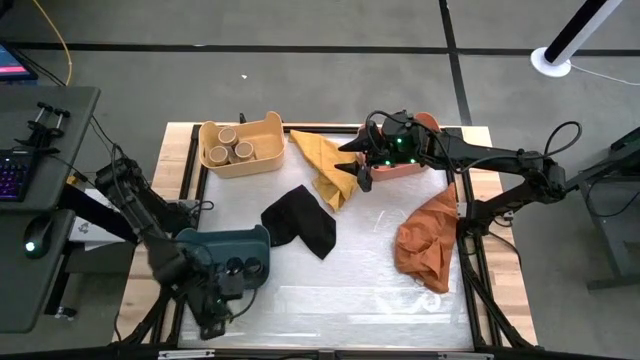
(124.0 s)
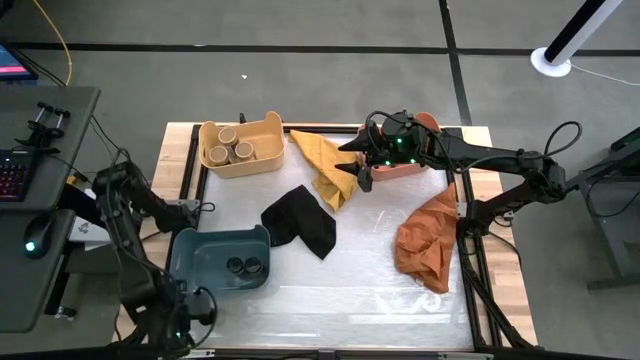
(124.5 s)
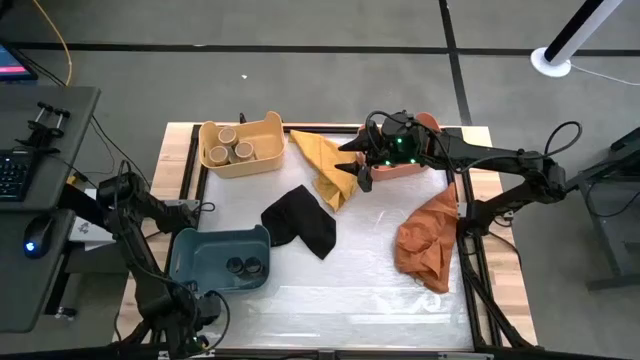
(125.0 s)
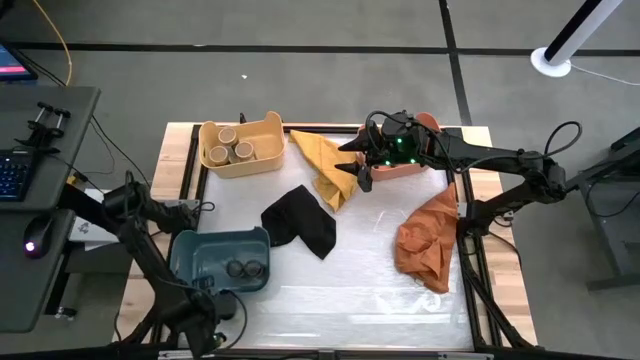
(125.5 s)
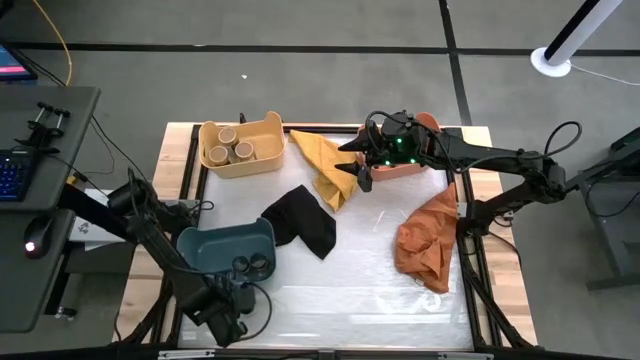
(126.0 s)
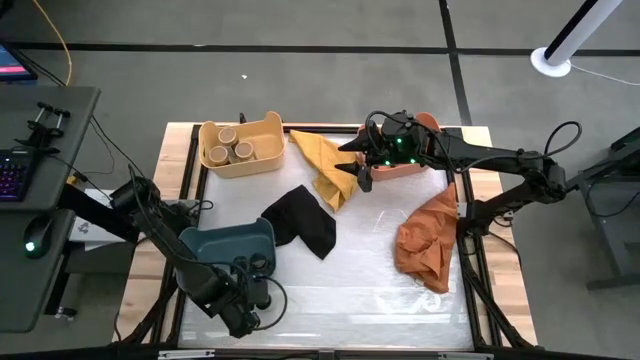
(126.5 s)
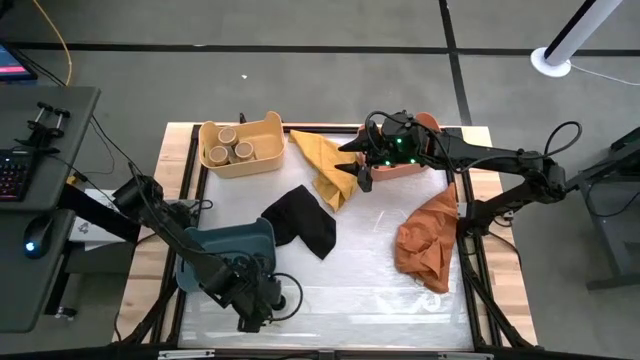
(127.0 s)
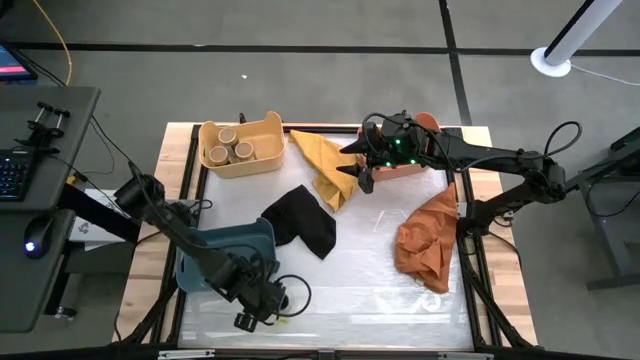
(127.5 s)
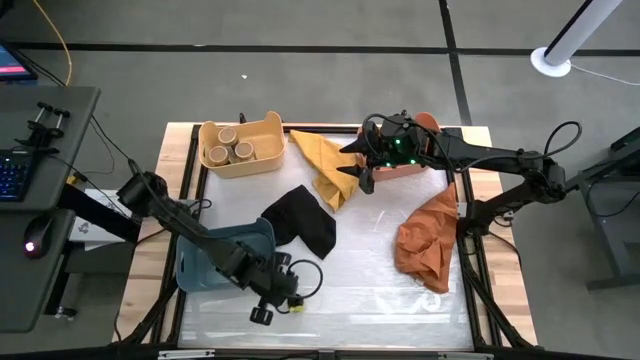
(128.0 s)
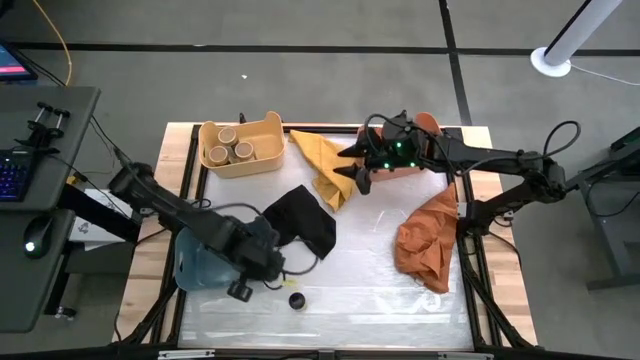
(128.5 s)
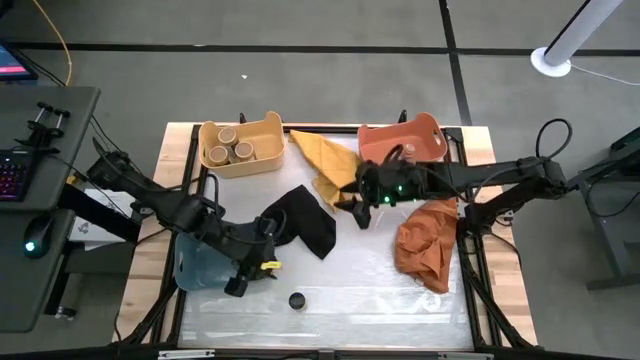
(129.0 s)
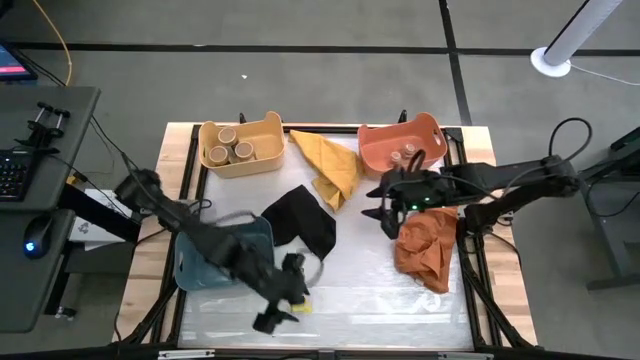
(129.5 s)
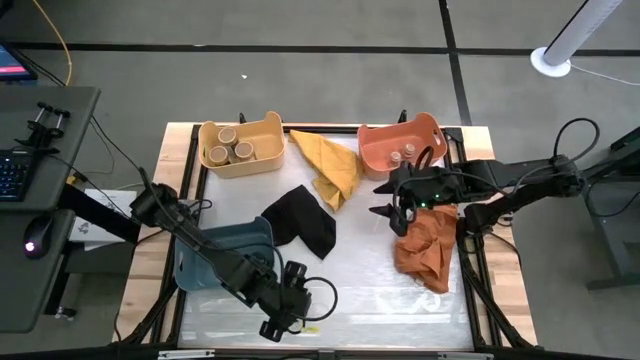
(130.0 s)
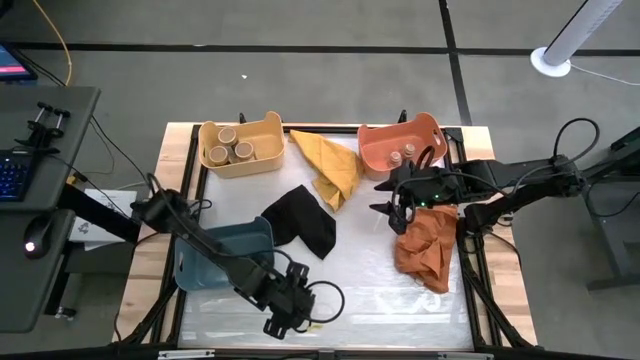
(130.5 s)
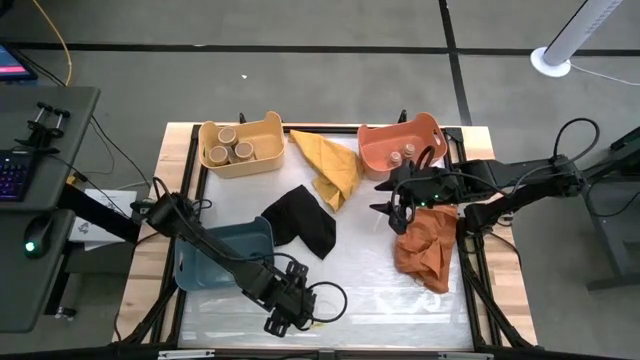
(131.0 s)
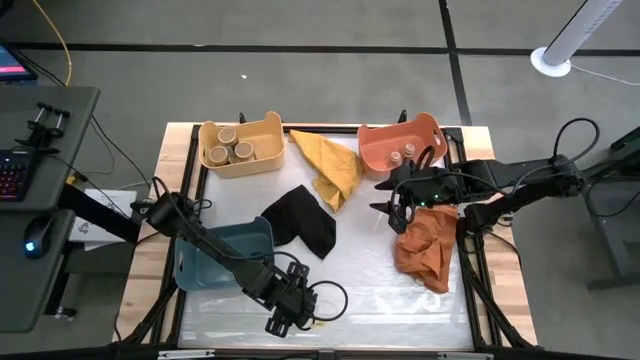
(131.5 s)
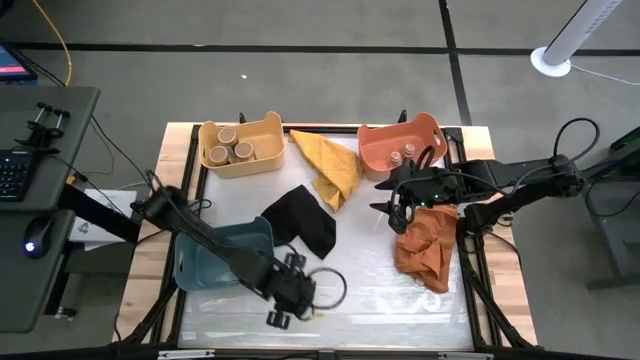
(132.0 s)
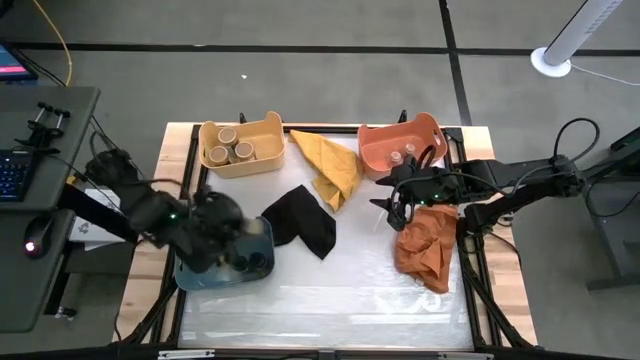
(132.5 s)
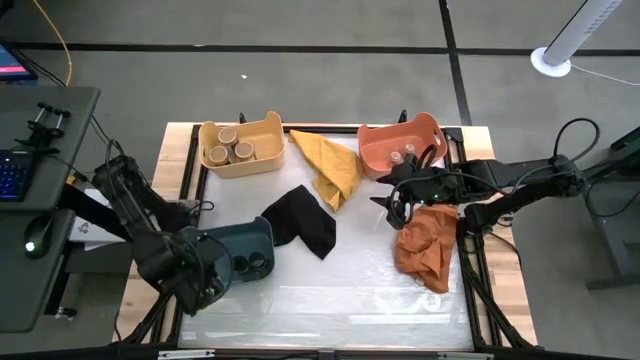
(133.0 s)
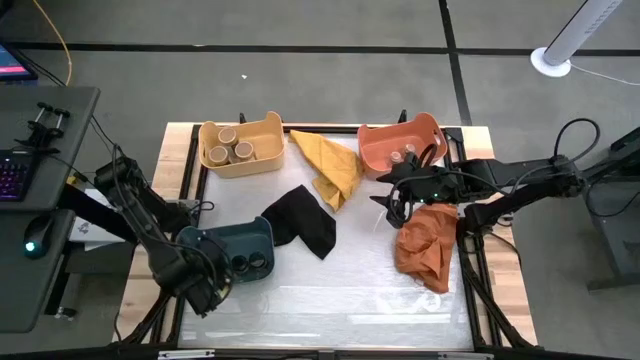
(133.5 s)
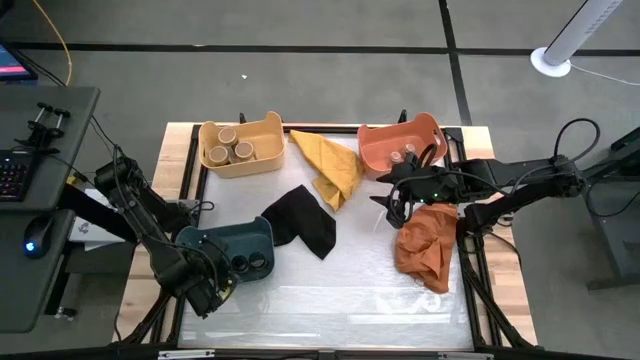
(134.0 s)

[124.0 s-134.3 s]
Task: Sort spices by type
Put the black spice bottle into the blue bin

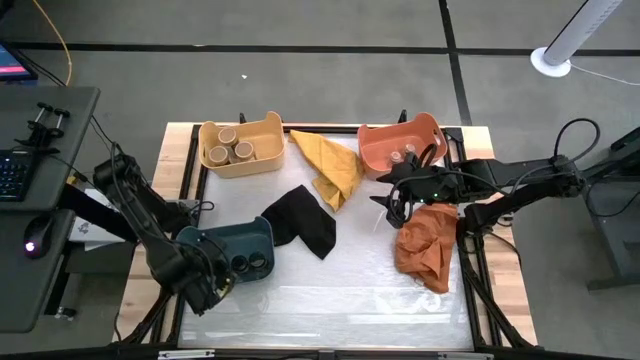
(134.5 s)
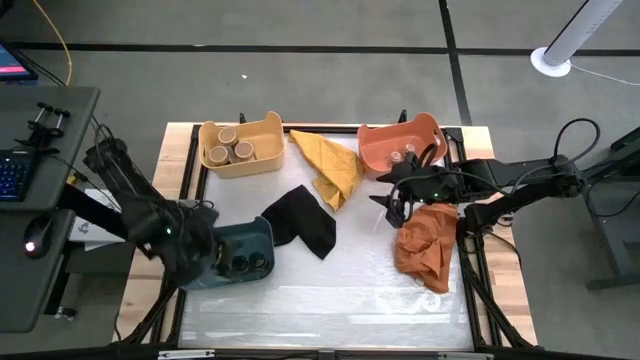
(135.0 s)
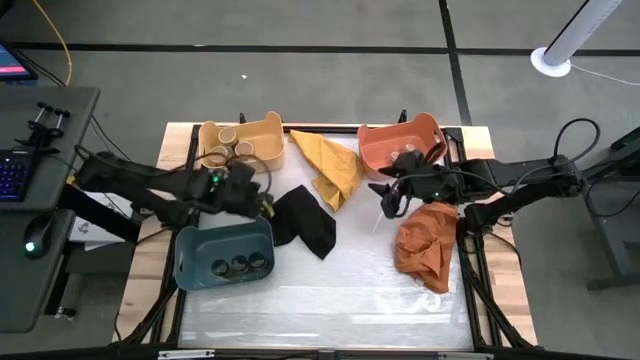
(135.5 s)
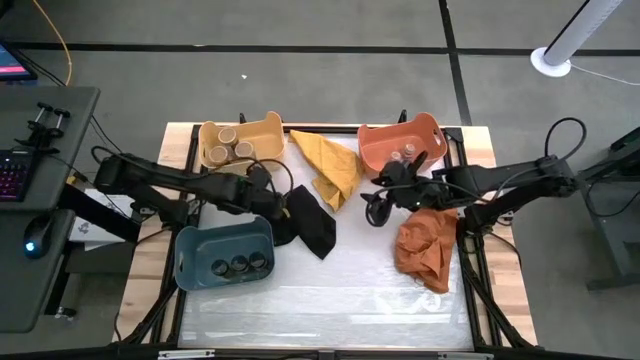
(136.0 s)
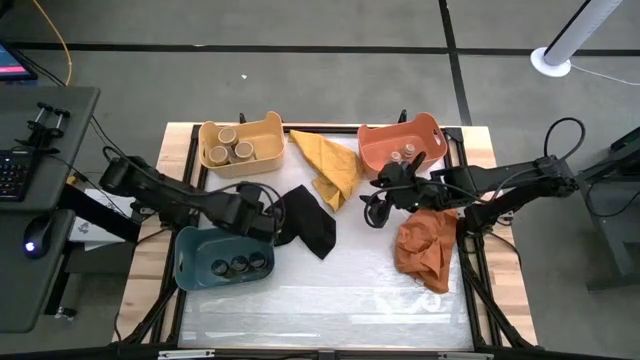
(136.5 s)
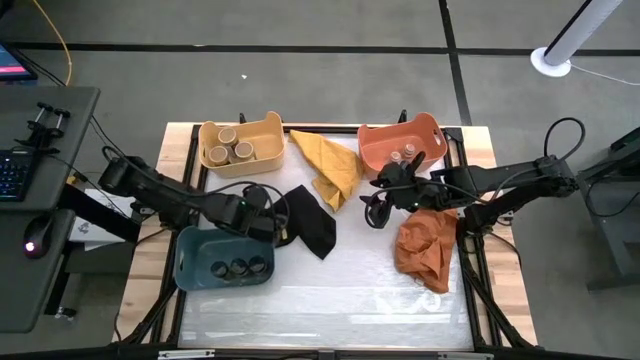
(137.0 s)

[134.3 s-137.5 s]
Adjust the blue bin

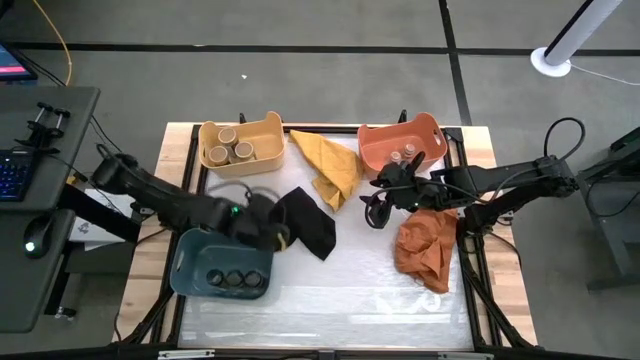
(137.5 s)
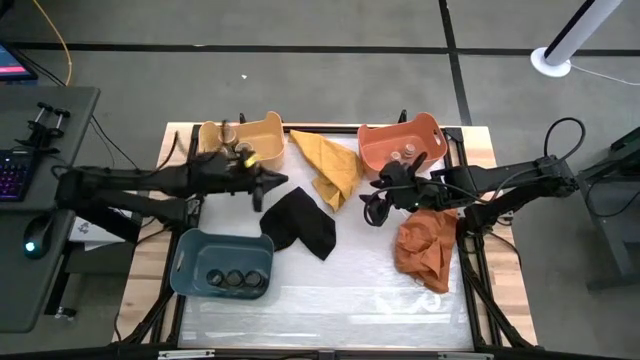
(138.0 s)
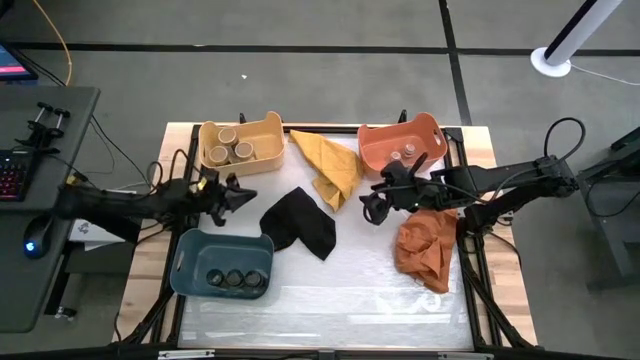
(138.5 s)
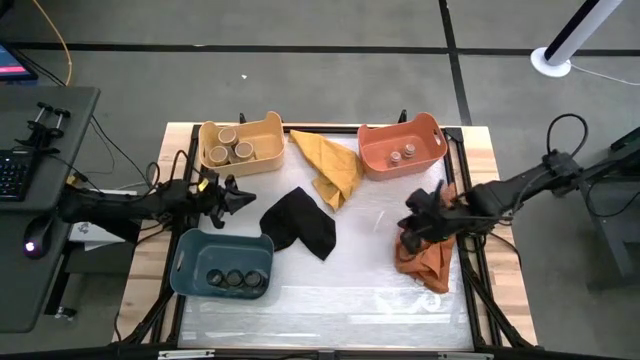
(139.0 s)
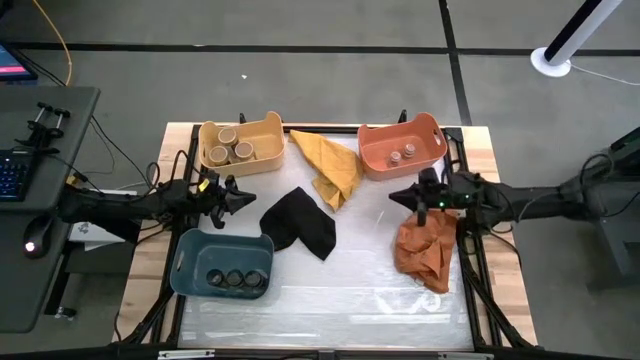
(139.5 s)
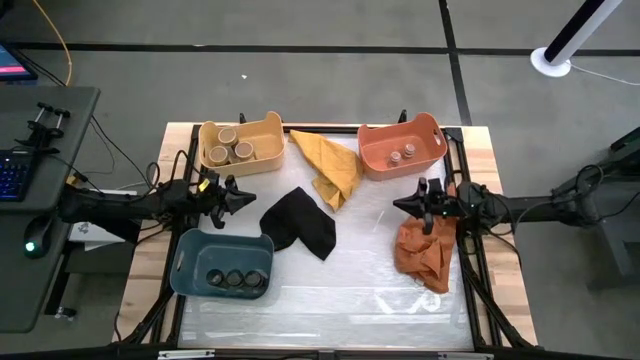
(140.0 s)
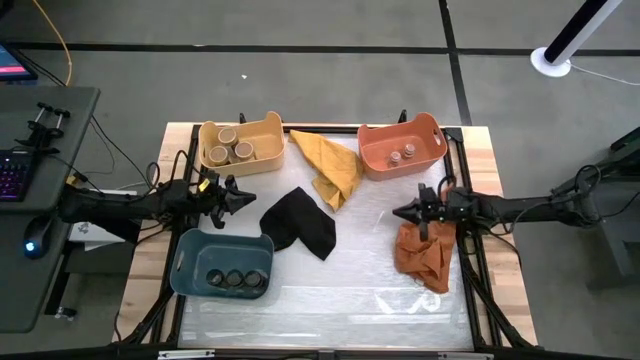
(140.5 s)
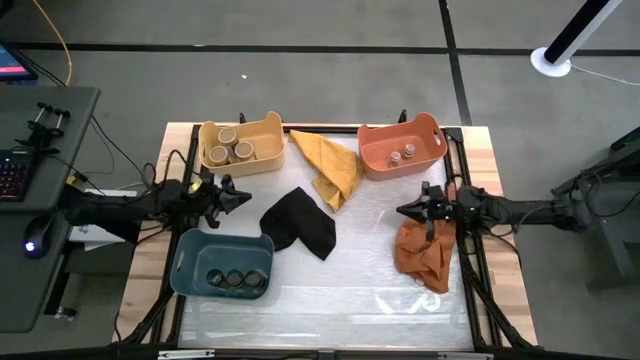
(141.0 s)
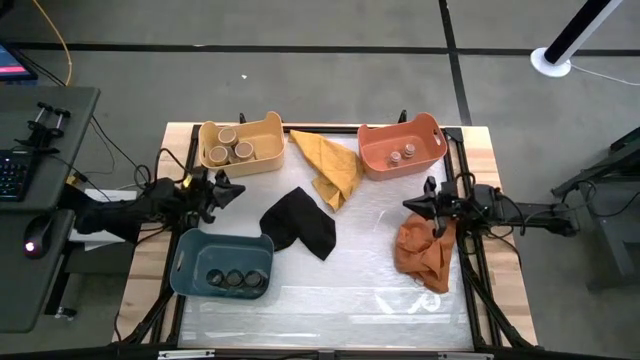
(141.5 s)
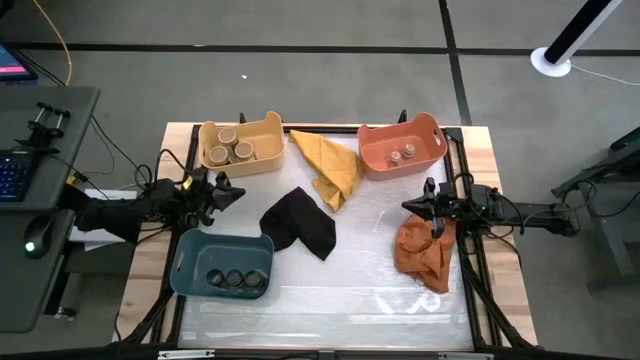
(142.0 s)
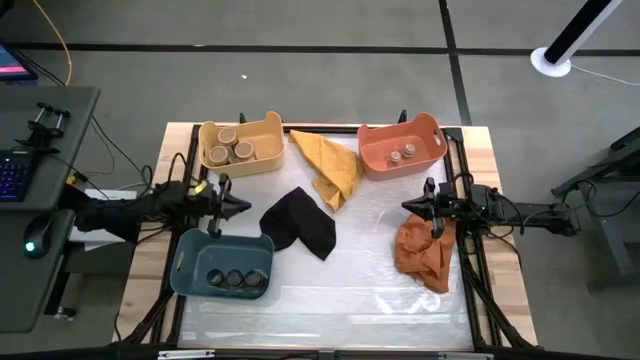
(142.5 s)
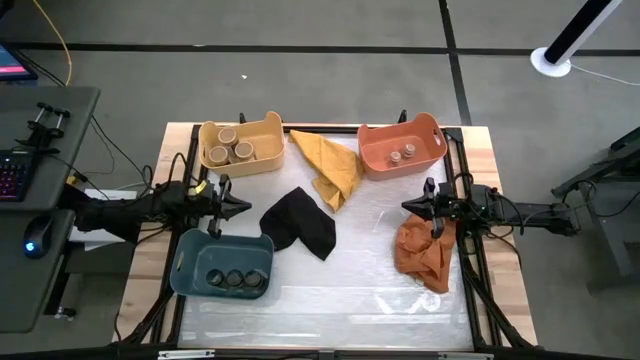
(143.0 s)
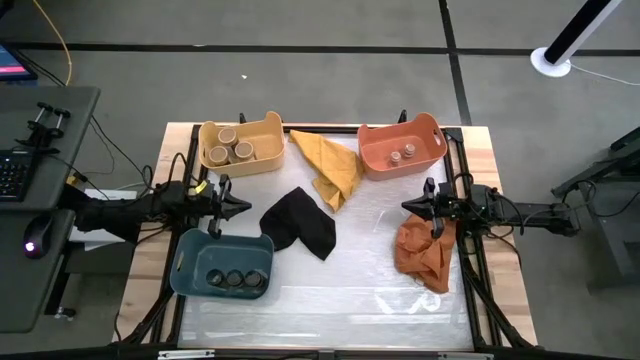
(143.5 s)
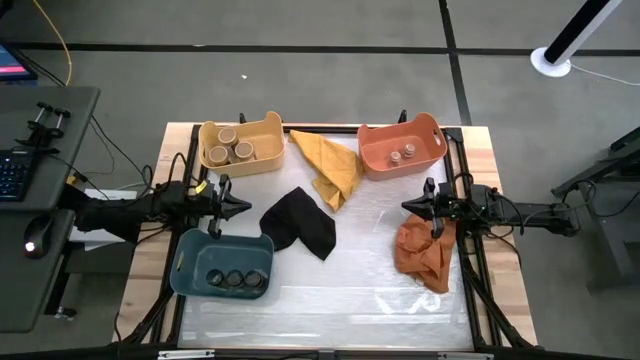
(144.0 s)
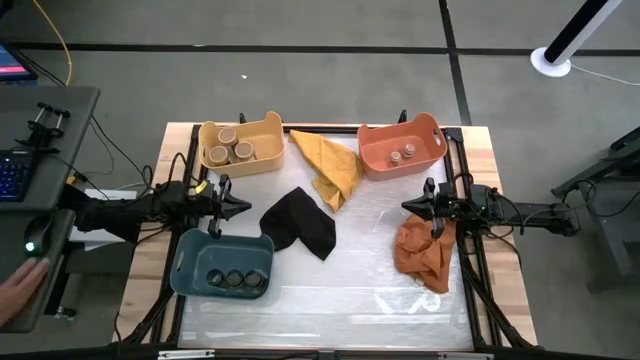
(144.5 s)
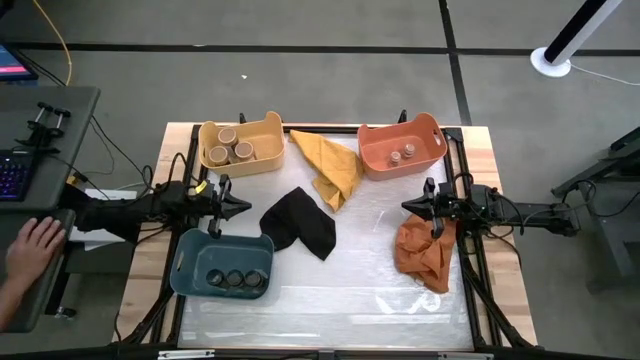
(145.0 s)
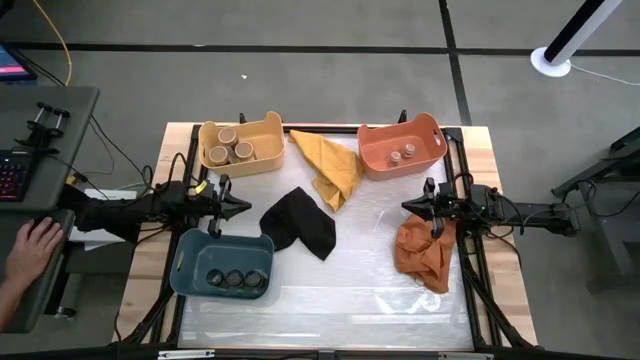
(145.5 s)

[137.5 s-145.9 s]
Return to Home Position
